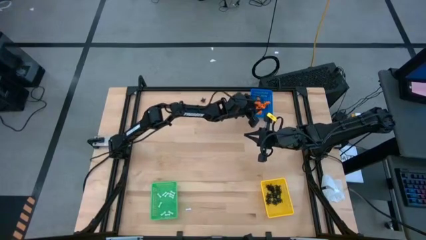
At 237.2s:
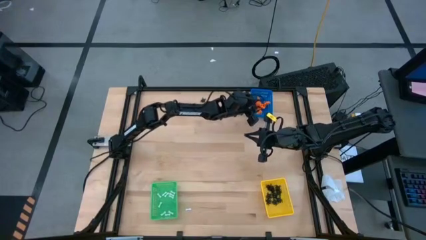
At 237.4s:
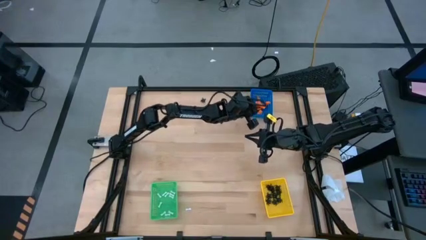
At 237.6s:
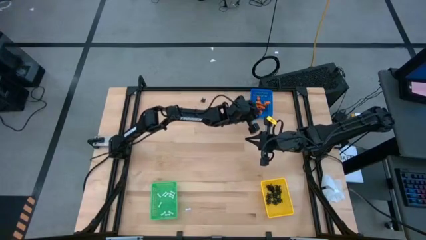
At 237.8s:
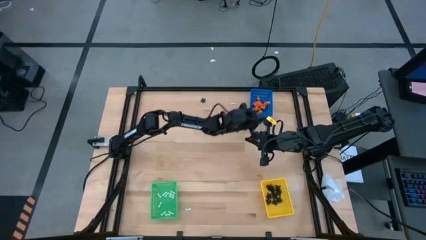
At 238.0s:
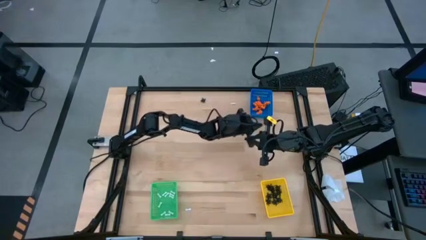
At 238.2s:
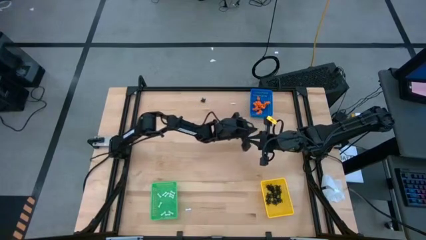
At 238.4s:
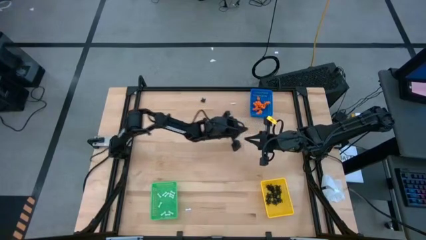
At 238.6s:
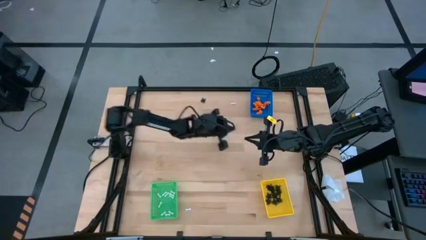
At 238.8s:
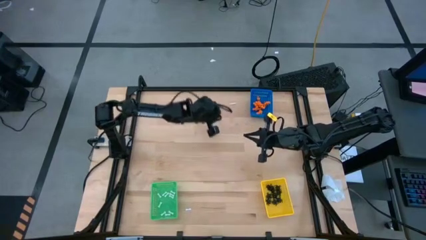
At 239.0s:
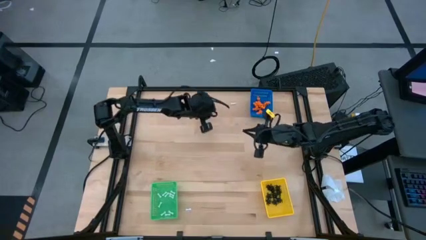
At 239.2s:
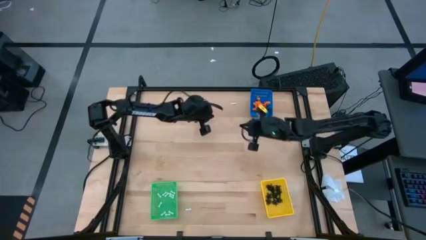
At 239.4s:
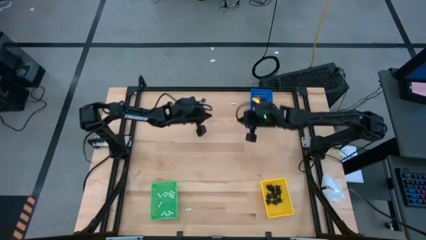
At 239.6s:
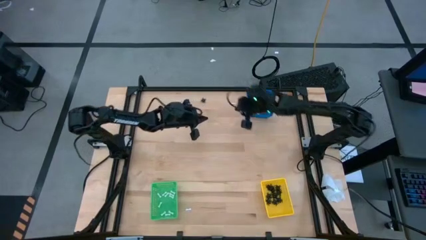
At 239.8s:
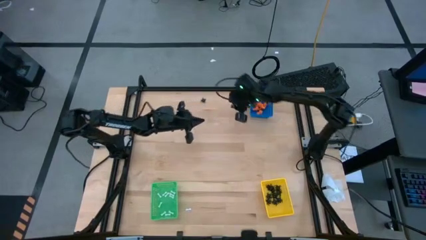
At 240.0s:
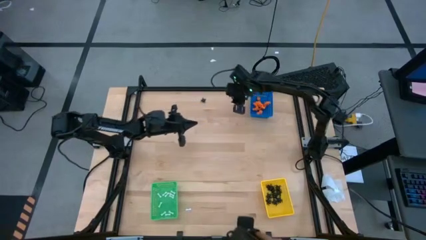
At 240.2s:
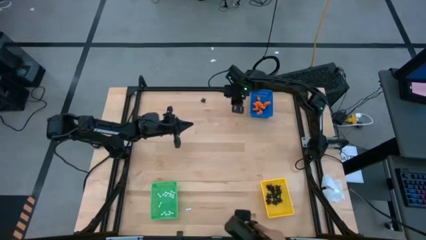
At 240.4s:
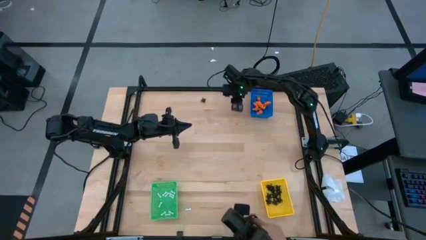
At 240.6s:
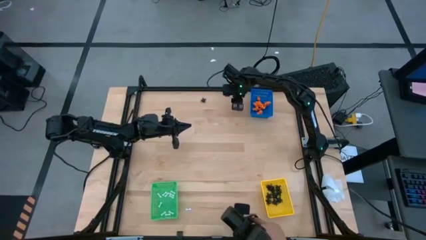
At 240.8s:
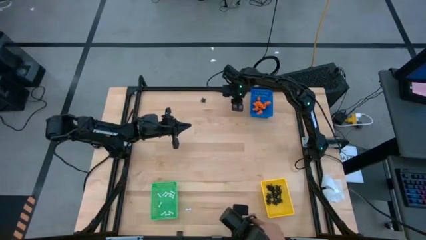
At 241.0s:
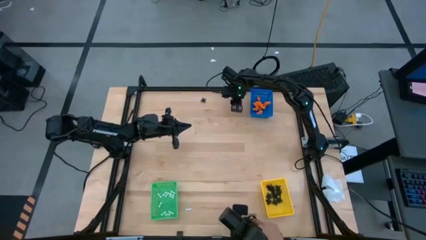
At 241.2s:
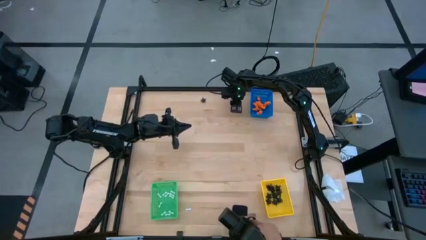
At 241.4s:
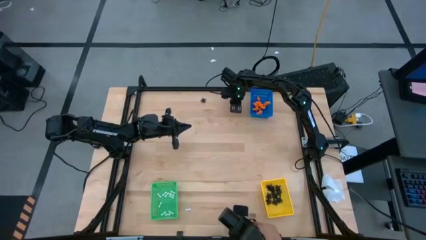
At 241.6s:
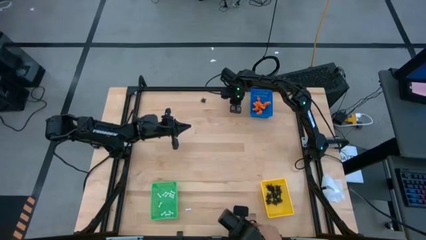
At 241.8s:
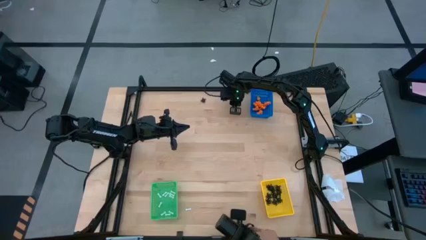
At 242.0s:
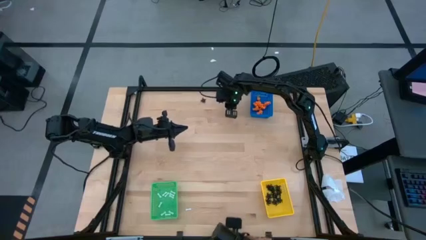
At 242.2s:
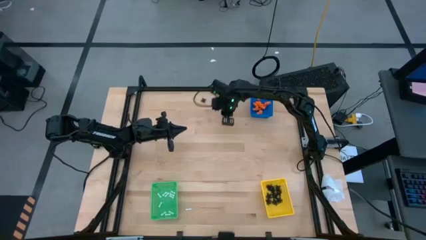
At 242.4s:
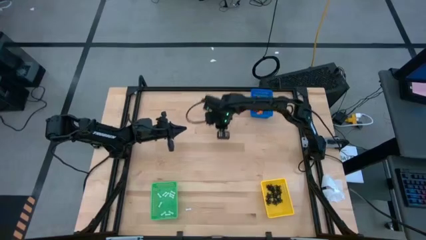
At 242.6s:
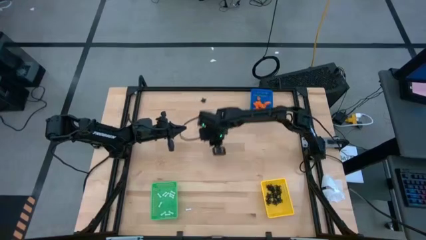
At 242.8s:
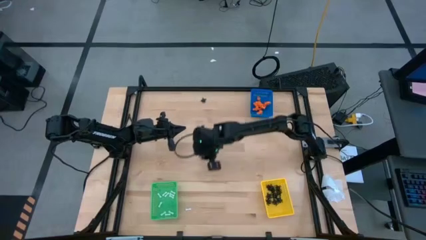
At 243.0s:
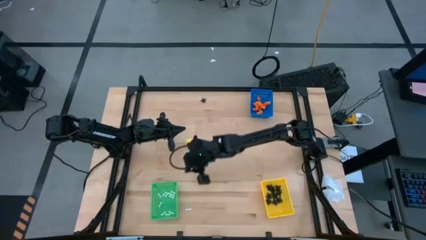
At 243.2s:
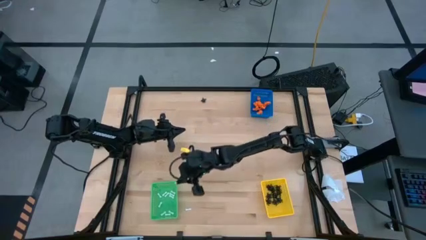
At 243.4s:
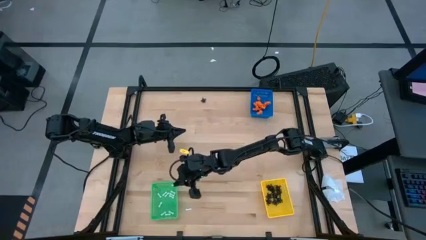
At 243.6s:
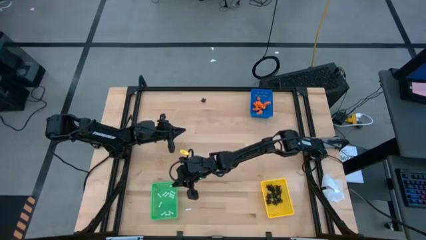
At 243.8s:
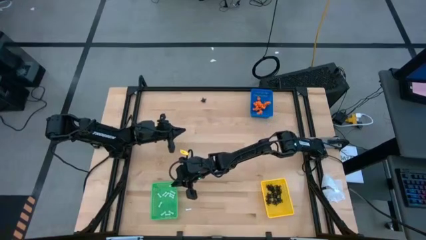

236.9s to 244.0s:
Task: Sort Halloween decoration
Put the white bone toy into the green bin

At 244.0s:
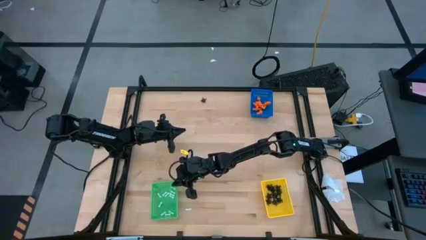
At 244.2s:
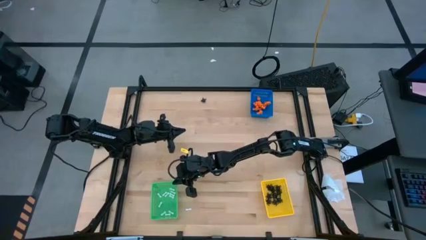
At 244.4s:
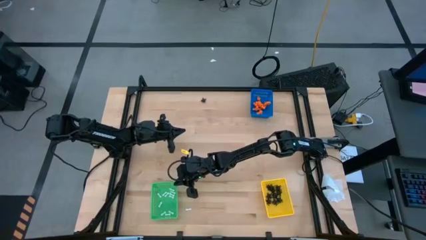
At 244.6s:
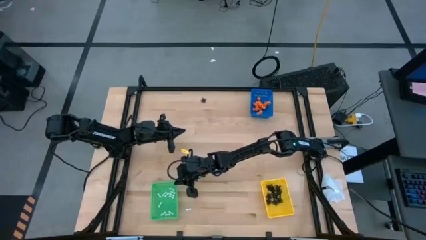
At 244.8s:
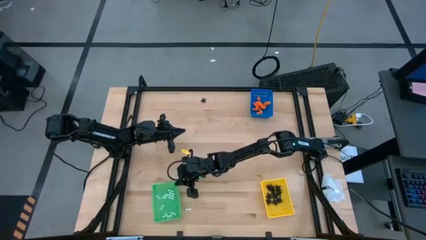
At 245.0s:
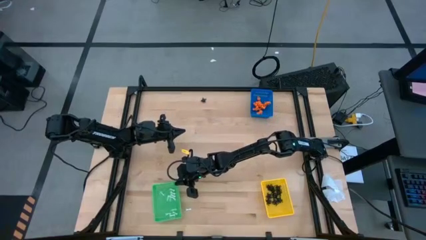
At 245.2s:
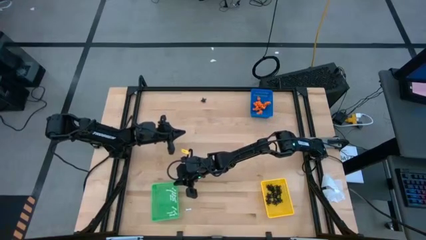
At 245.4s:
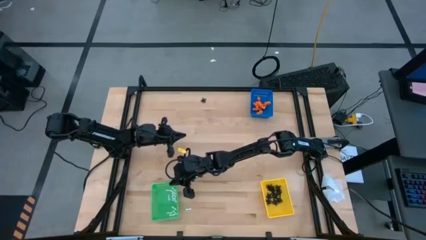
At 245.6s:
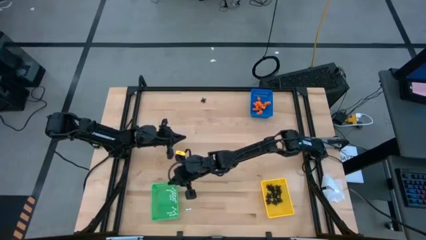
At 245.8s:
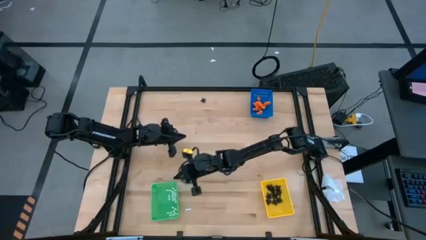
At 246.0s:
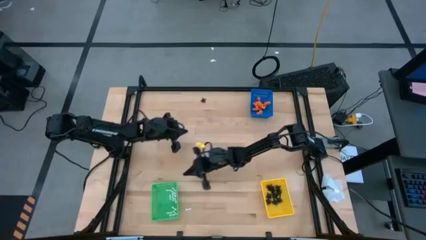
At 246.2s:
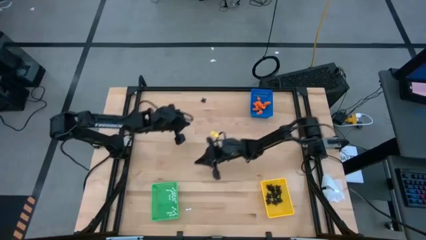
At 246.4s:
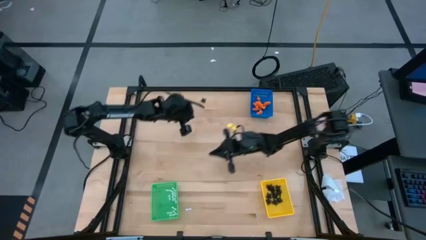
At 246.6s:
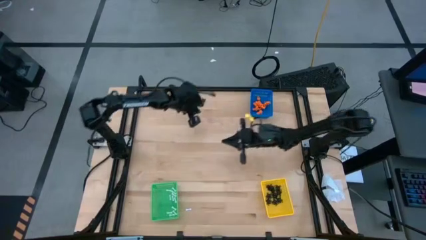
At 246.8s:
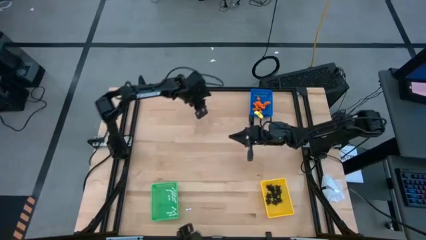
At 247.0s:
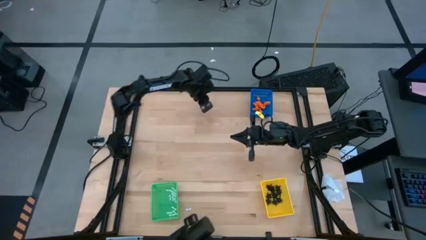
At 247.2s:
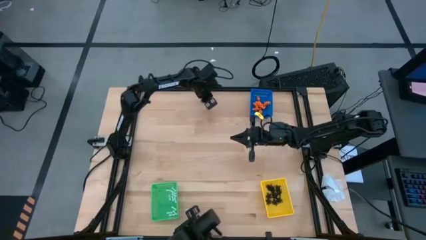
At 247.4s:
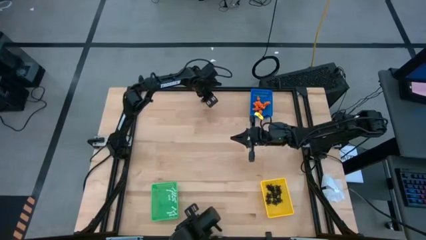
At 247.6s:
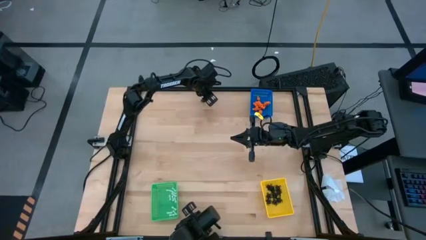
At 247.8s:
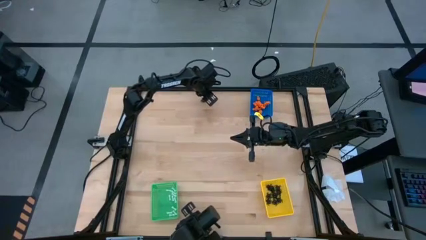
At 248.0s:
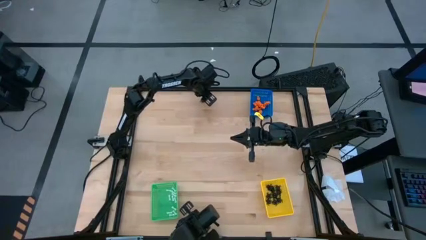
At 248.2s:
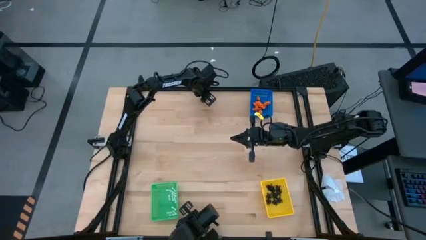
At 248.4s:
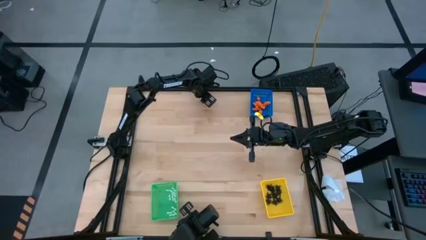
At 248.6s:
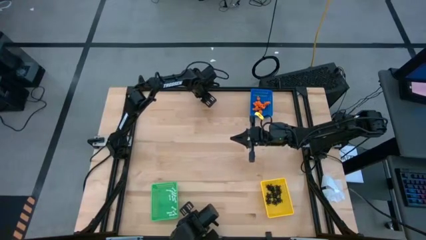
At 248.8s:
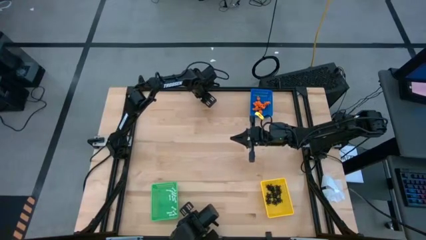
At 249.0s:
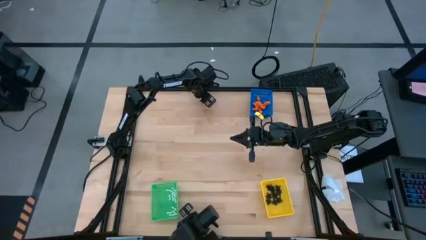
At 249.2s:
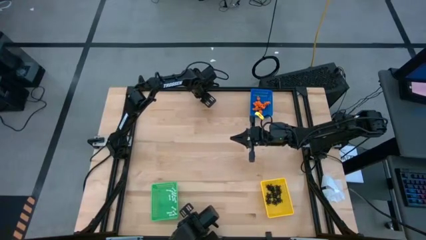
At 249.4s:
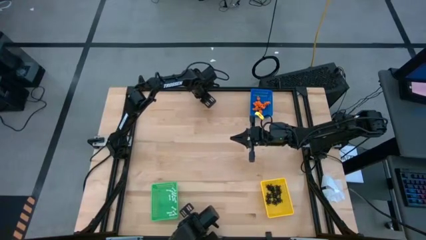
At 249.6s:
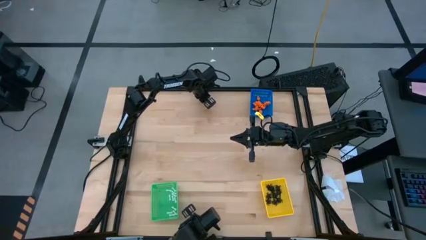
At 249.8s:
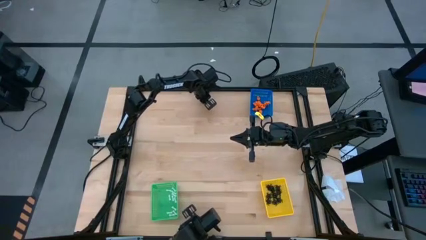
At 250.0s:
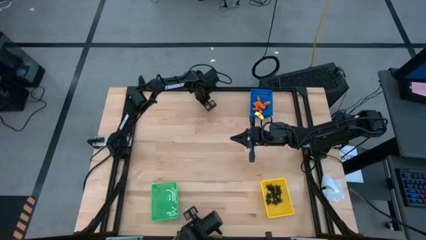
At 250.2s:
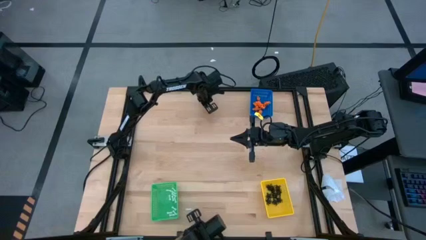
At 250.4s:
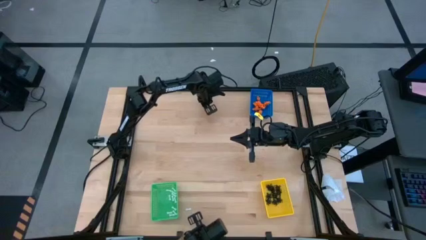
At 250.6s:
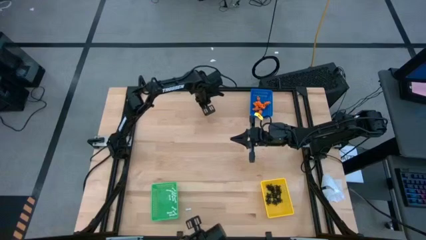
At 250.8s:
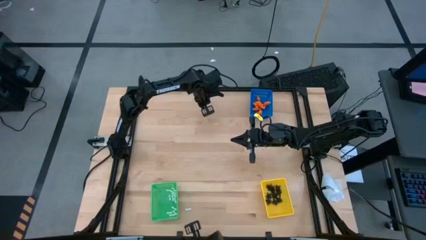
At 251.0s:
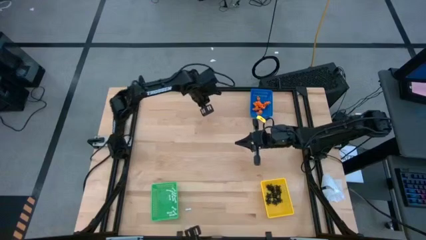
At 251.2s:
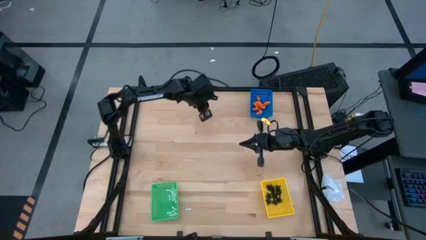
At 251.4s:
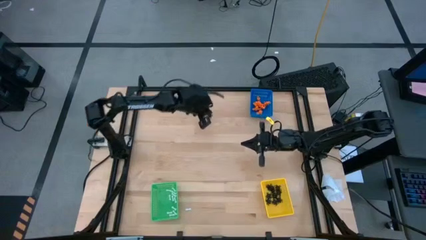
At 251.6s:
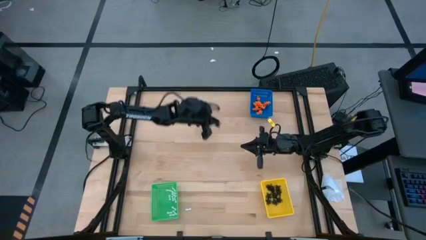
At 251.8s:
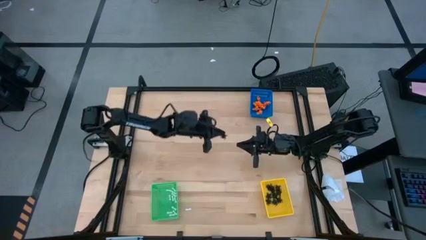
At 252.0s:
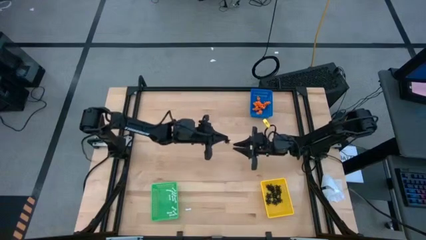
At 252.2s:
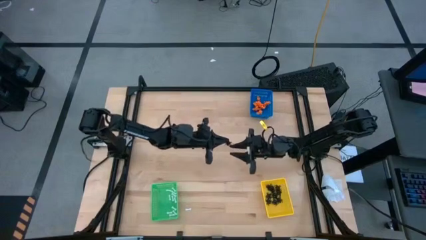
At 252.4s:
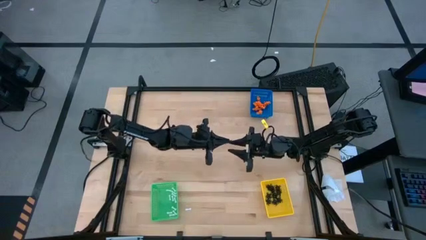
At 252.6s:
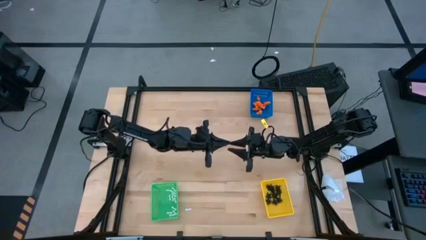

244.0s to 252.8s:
Put the black toy into the yellow bin

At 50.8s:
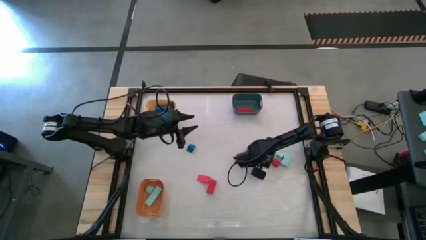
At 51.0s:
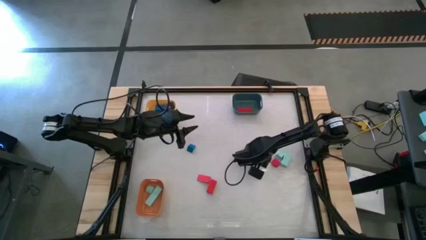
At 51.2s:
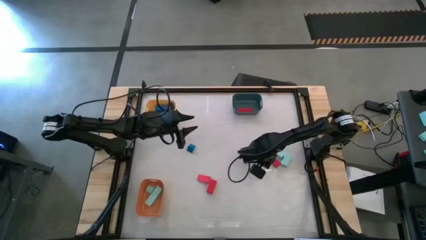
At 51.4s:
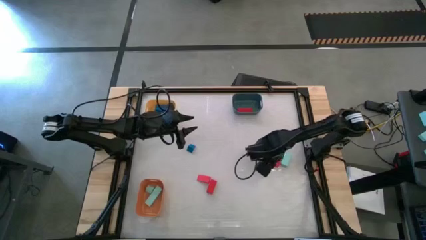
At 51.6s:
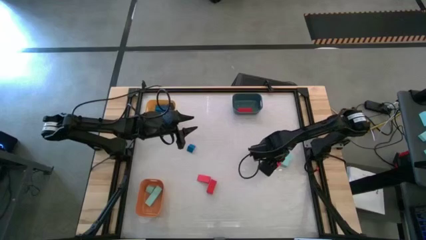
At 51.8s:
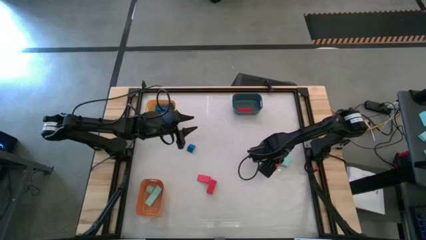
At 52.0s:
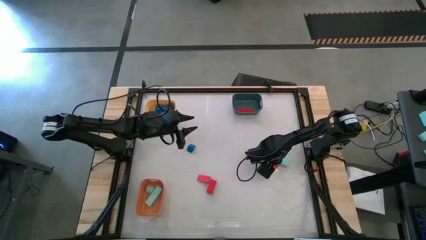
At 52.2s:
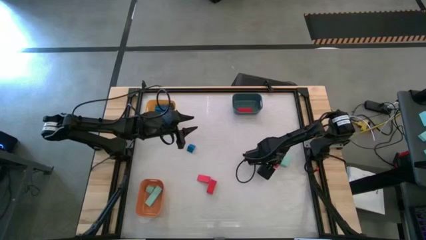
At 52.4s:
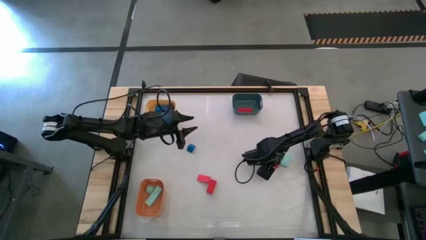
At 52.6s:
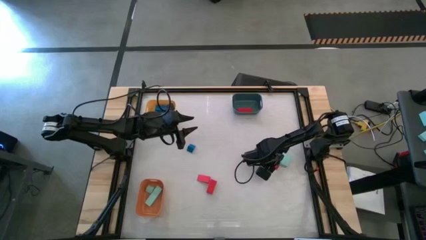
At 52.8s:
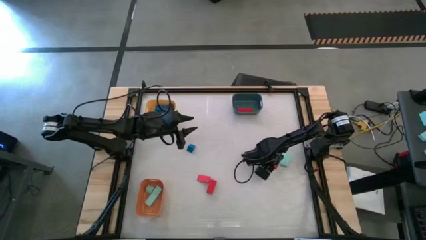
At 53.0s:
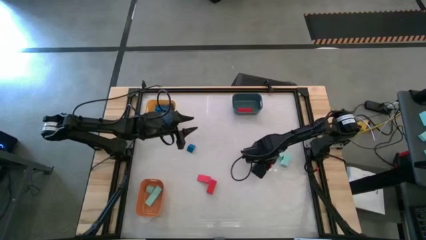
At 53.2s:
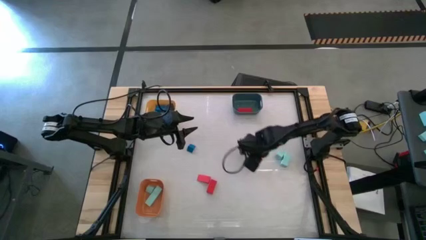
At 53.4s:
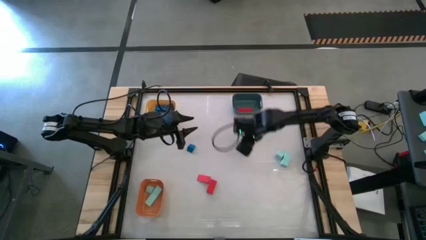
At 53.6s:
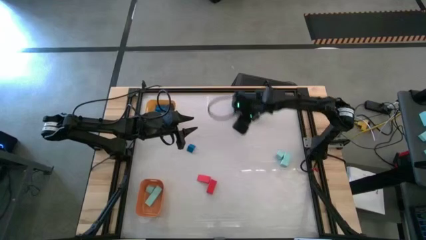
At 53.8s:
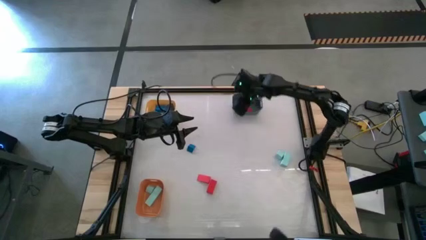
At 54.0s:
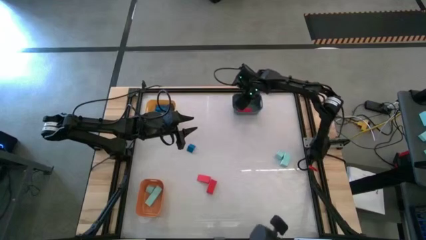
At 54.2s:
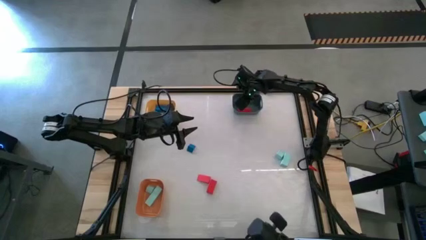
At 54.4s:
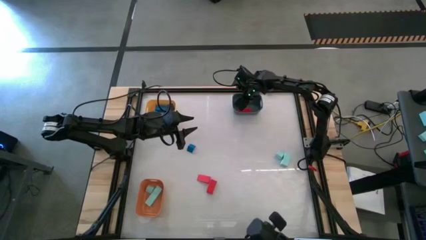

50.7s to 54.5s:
Task: Sort & place blocks by color
Put the top right red block into the blue bin
